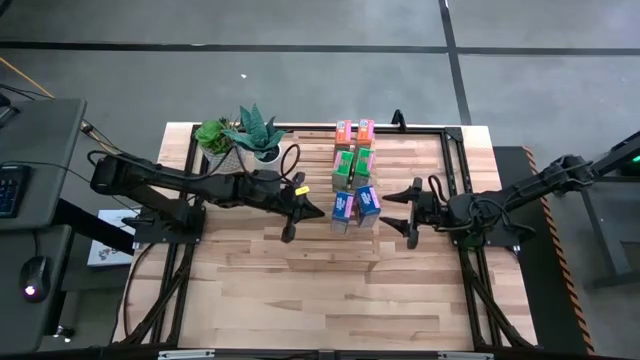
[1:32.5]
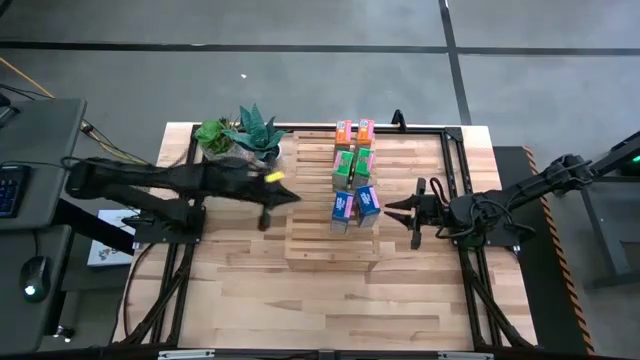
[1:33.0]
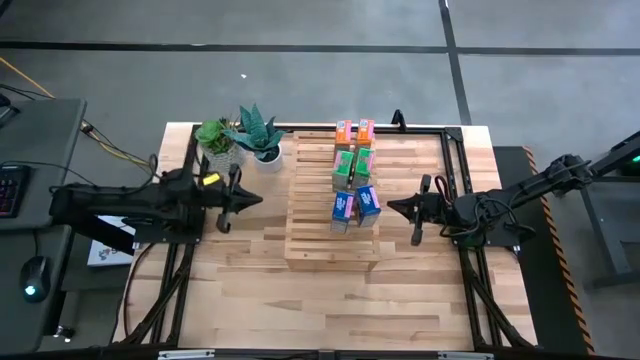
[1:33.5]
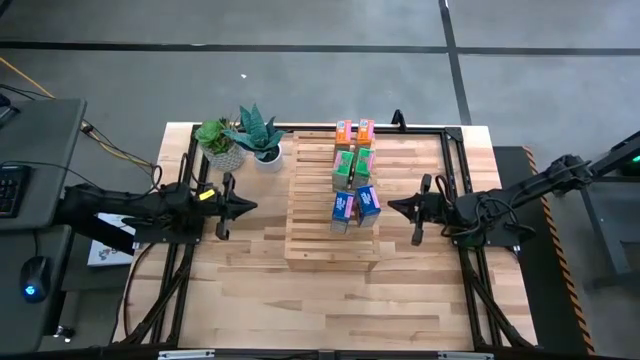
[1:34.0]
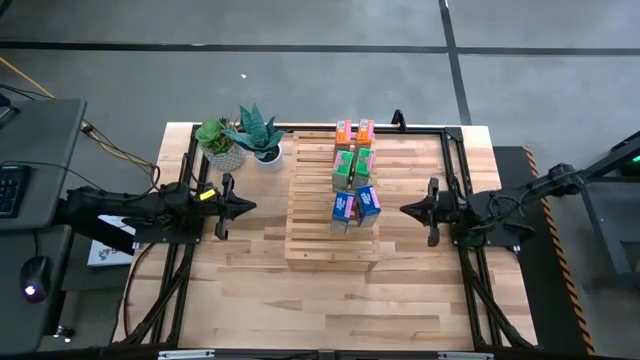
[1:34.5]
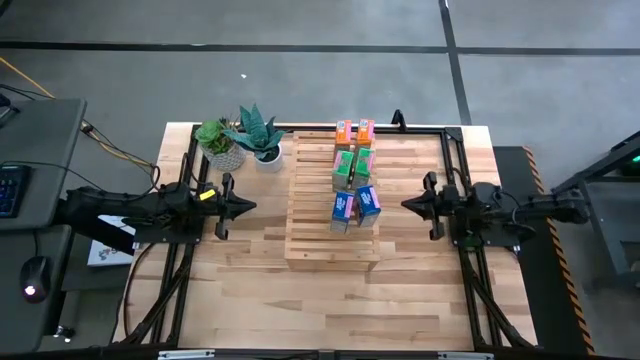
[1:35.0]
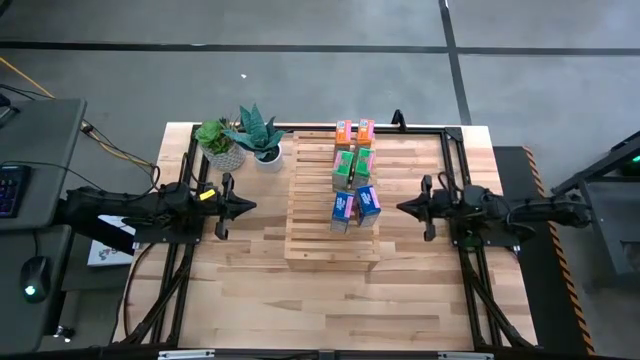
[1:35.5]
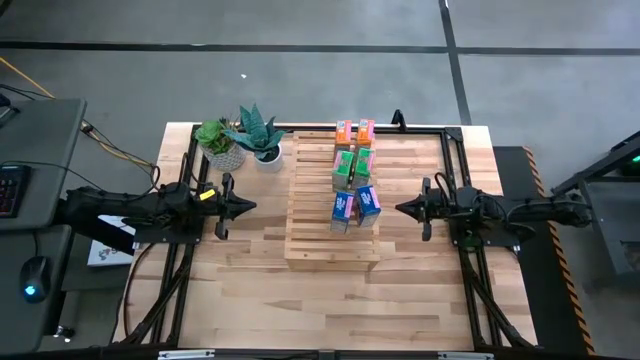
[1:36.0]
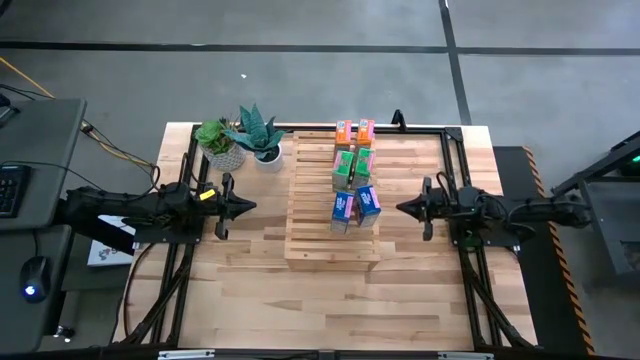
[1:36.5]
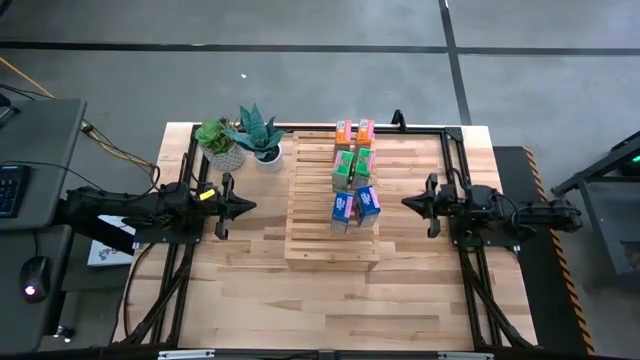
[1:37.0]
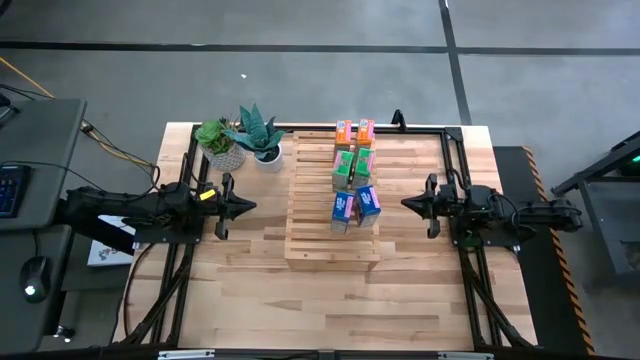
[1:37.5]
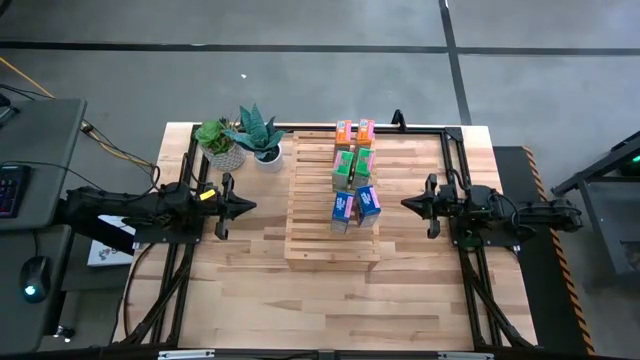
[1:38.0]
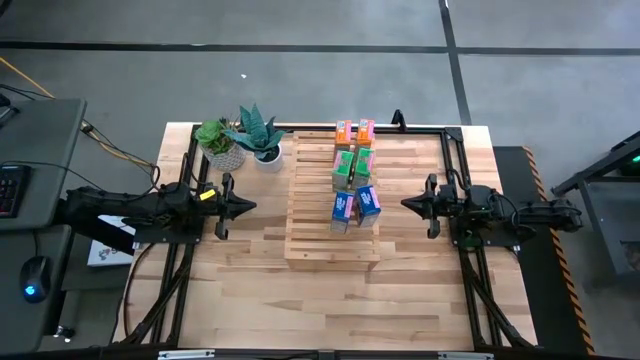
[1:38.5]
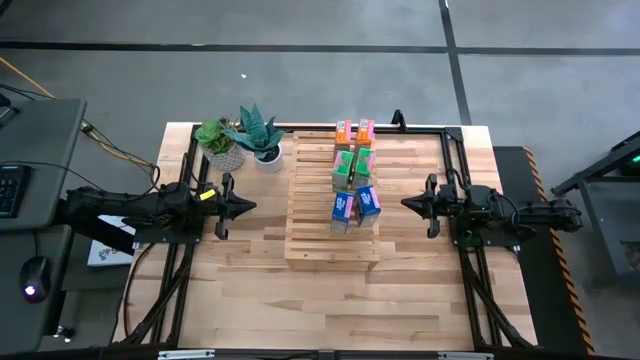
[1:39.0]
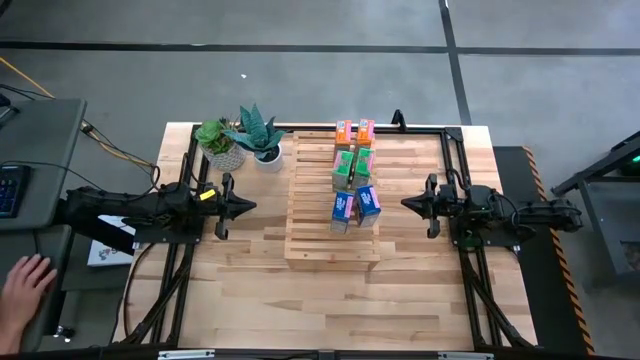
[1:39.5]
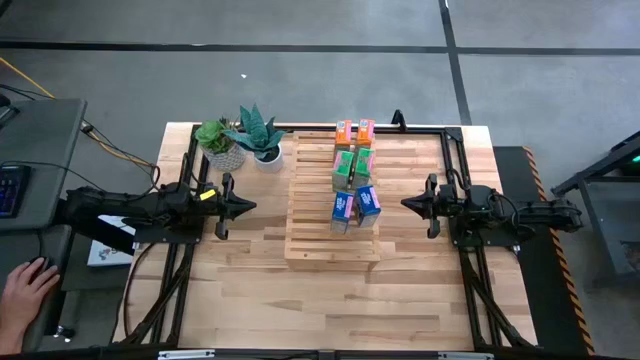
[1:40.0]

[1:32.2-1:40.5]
Task: Stack cereal on shelf
Return to Home Position

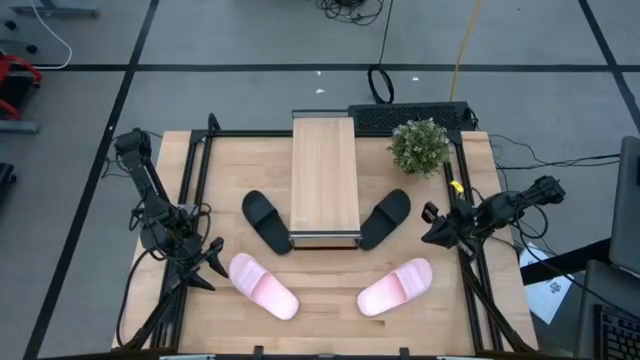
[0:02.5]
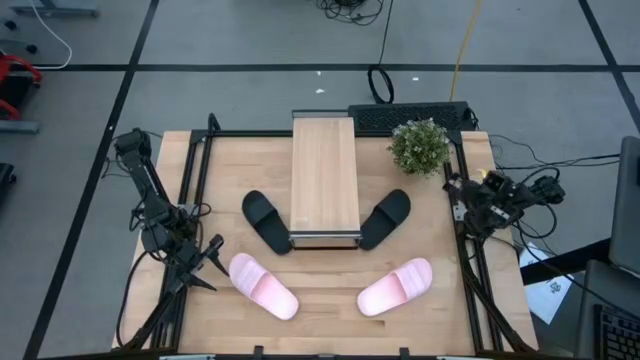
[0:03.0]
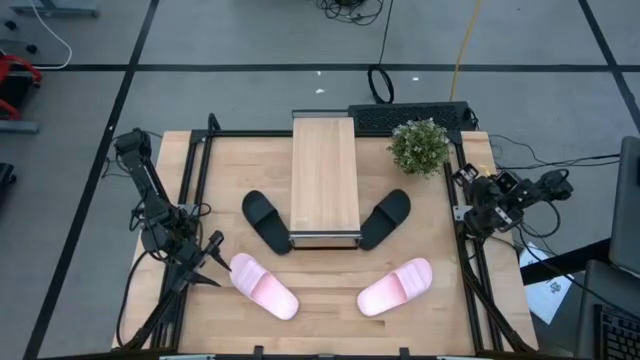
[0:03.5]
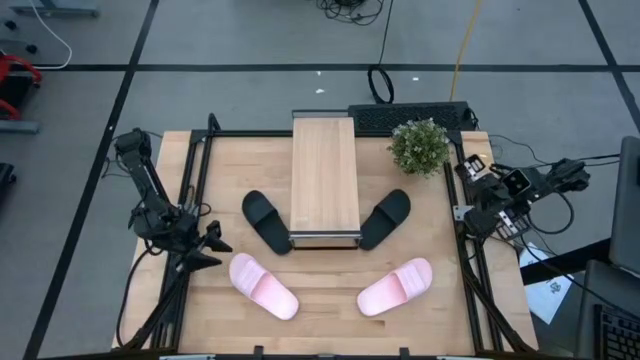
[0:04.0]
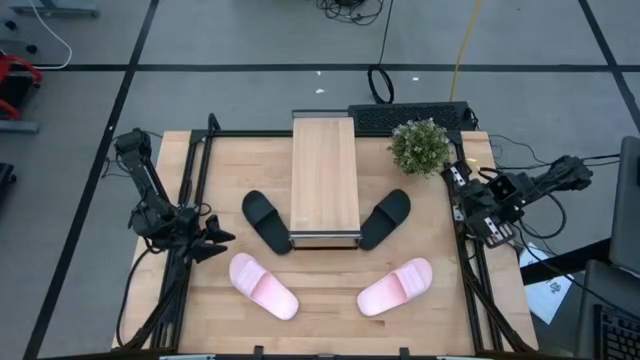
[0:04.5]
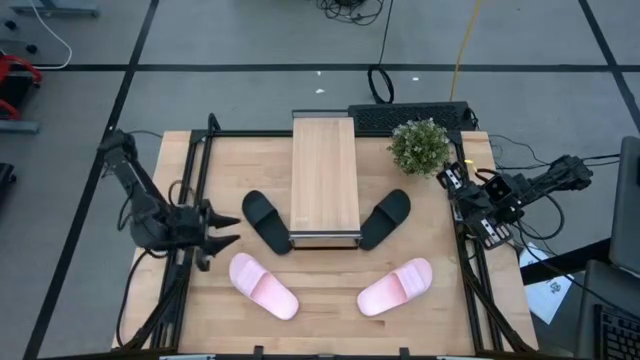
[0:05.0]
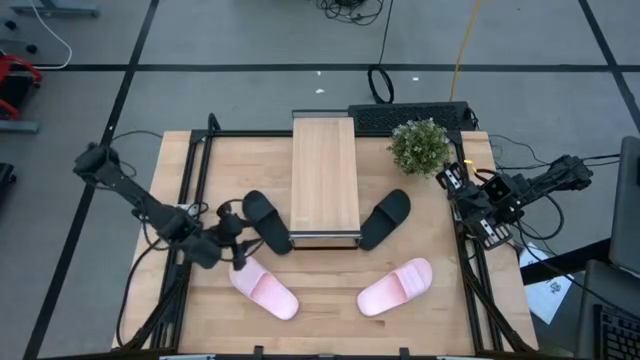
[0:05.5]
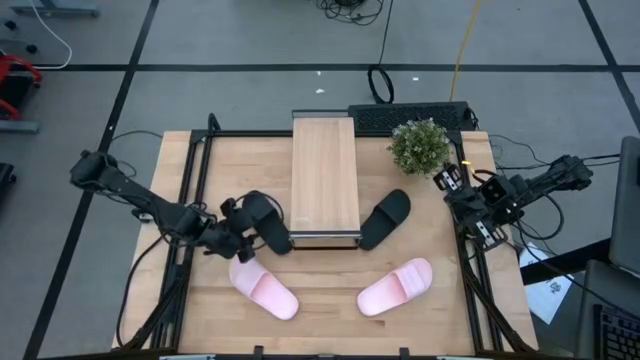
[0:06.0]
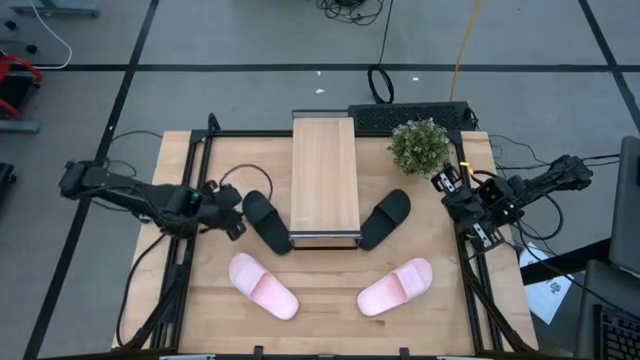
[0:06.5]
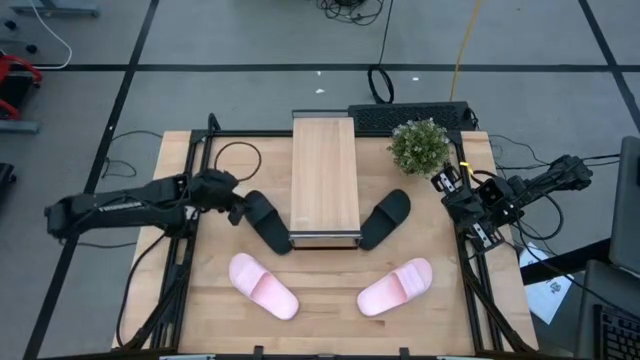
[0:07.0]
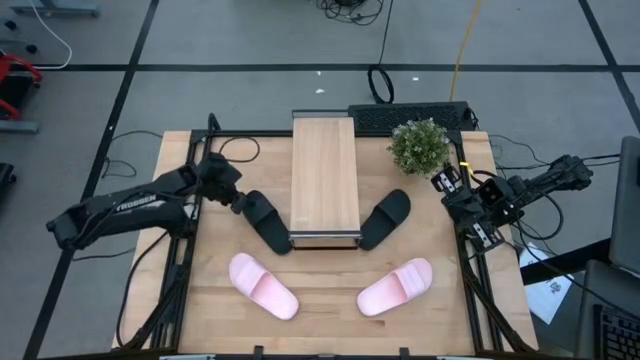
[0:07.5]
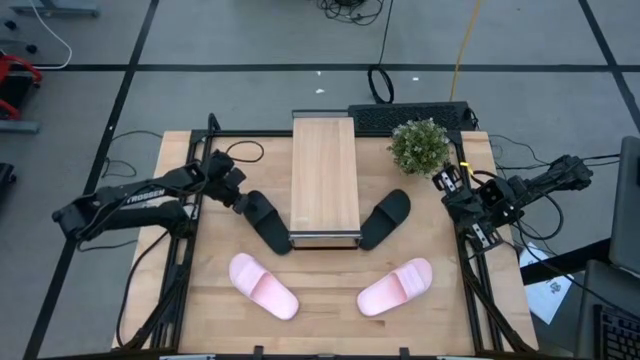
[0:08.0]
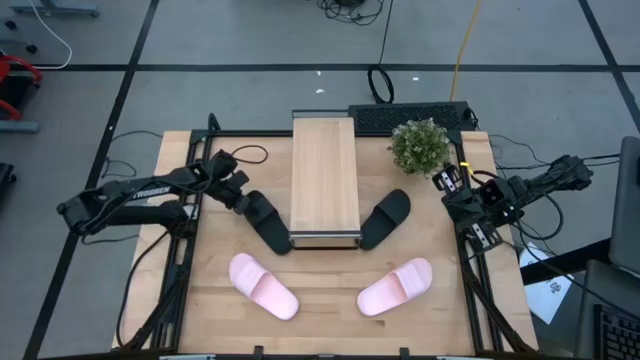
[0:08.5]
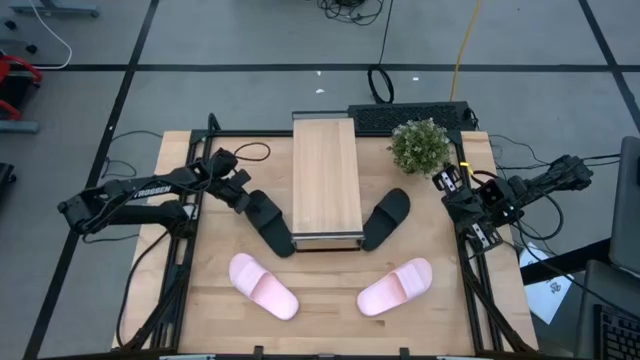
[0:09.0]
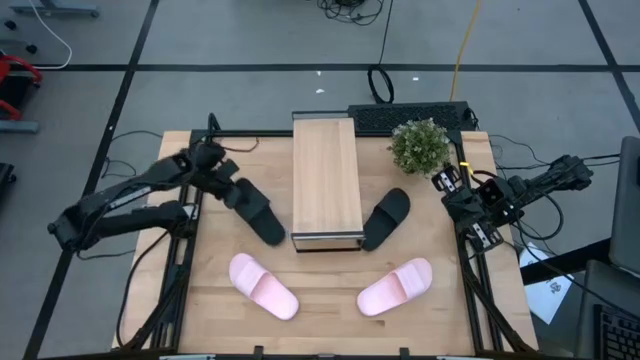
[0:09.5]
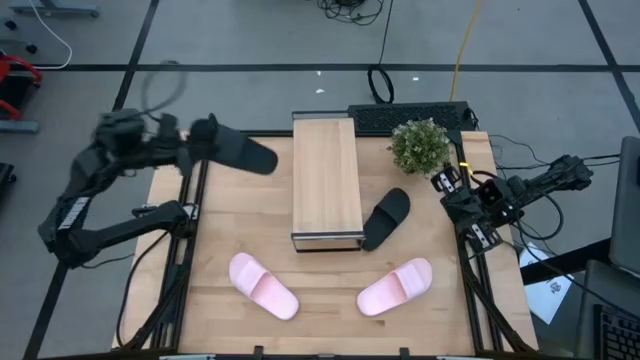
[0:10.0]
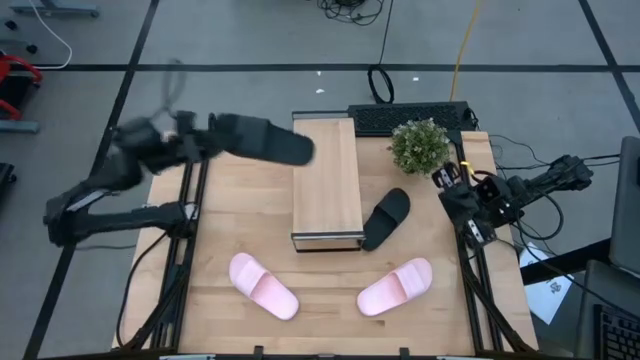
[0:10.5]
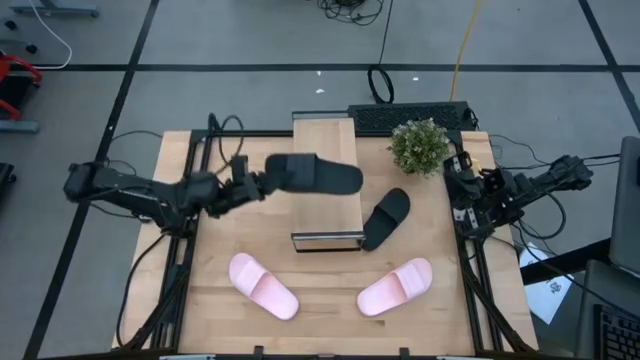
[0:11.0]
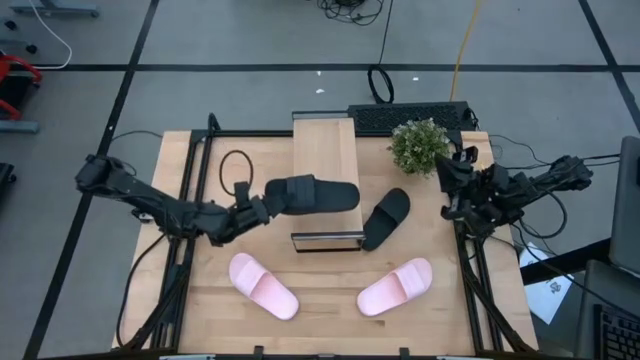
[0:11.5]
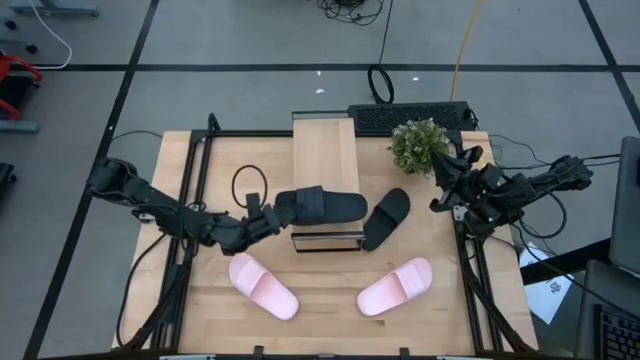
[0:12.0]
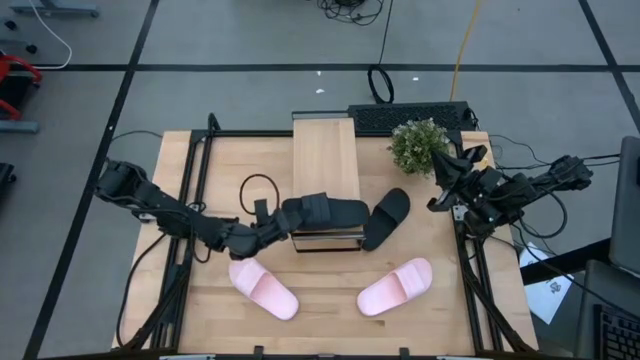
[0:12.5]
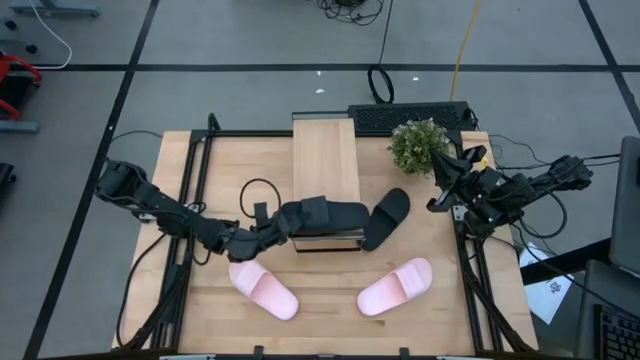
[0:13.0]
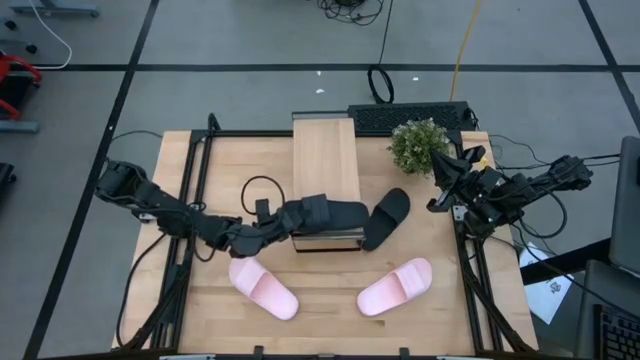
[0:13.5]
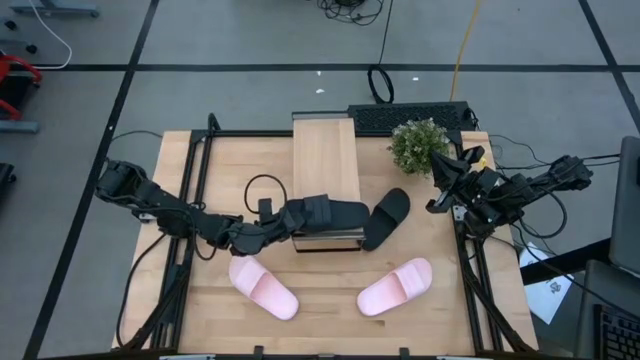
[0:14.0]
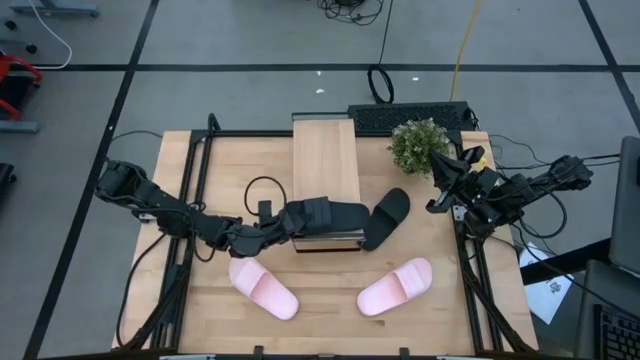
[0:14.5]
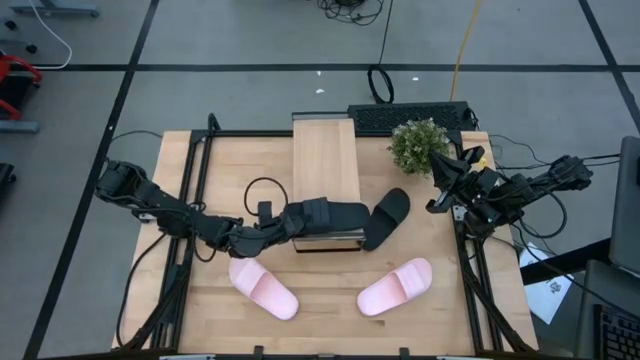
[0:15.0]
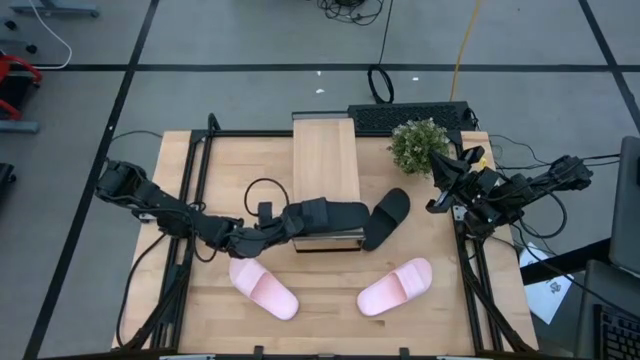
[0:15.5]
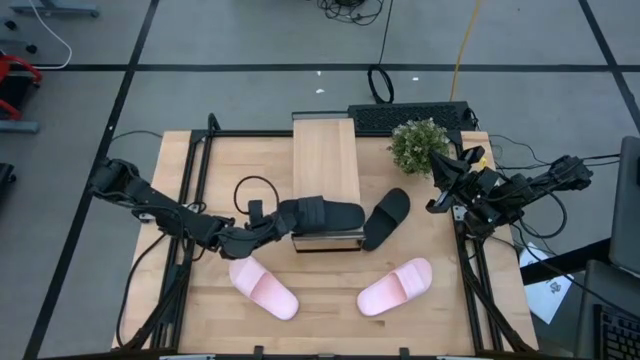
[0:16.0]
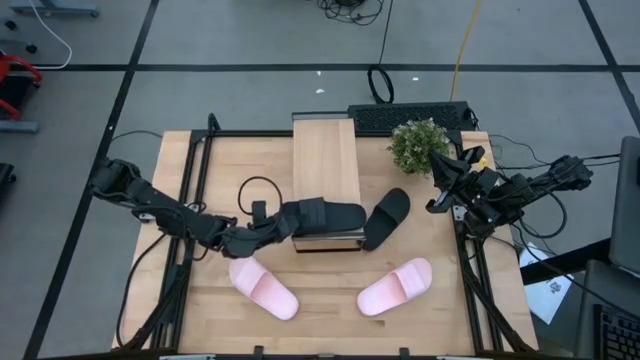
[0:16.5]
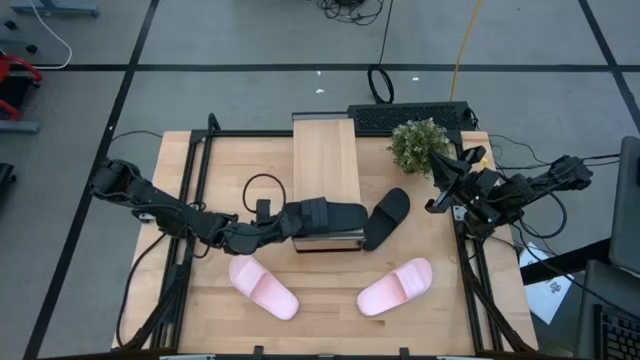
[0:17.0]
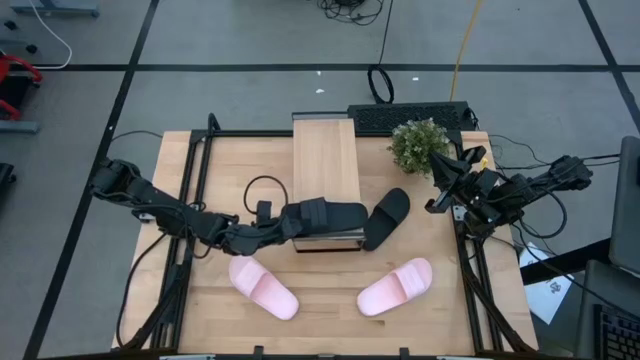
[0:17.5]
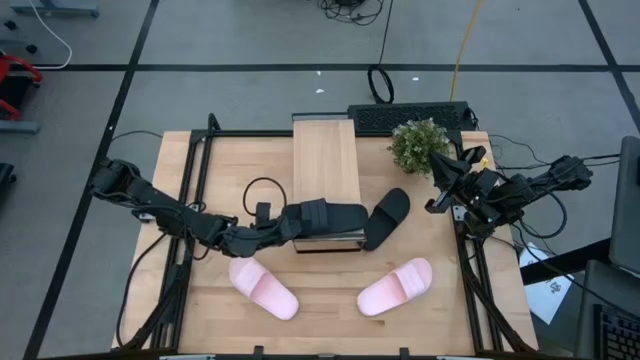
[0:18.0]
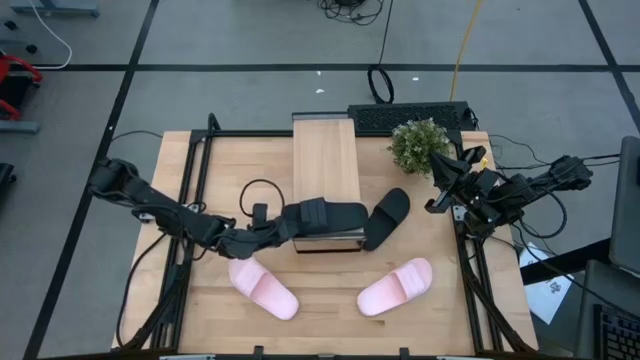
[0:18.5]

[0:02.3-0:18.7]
Task: Pick and place slides into the shelf
Put the left black slide on the shelf
